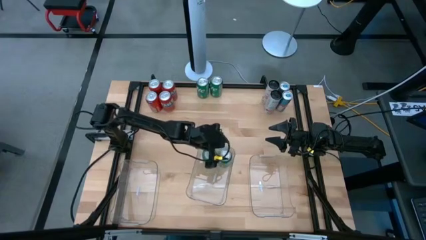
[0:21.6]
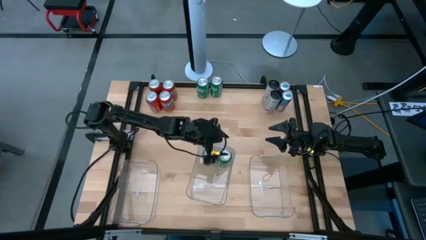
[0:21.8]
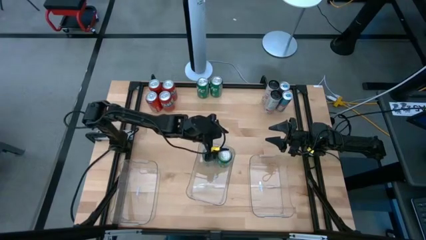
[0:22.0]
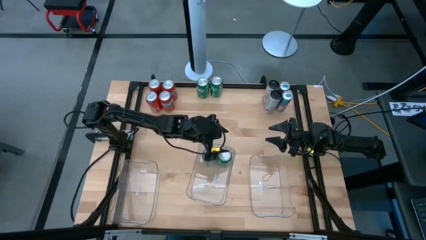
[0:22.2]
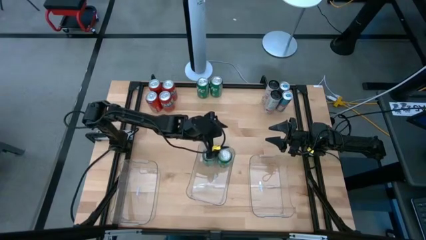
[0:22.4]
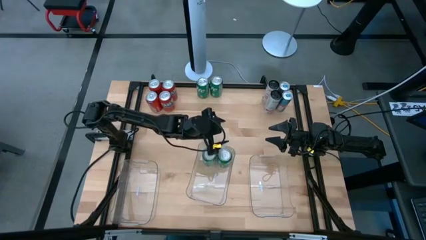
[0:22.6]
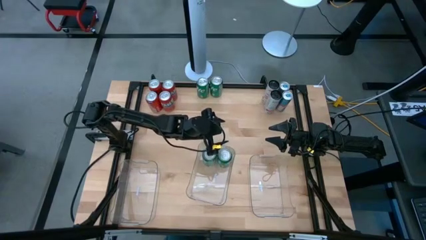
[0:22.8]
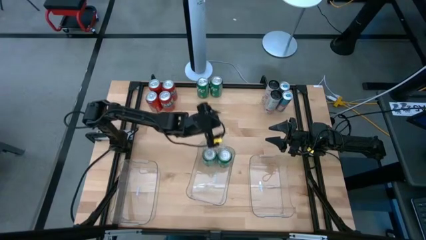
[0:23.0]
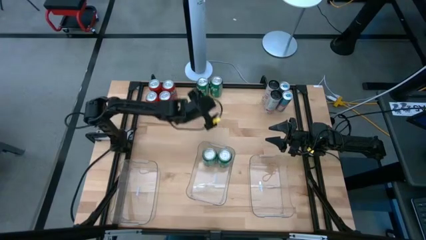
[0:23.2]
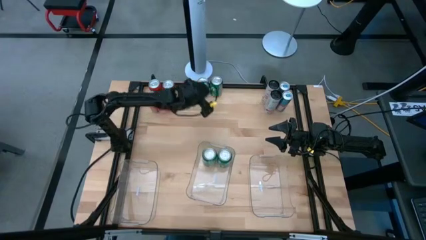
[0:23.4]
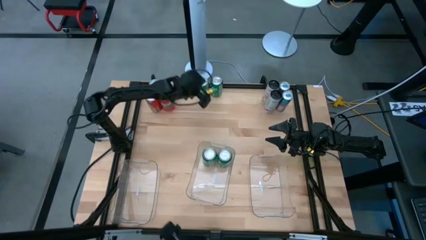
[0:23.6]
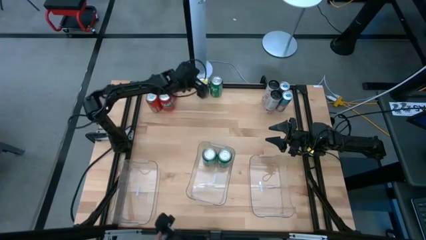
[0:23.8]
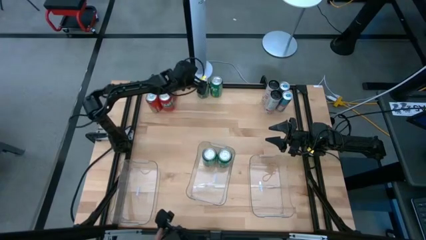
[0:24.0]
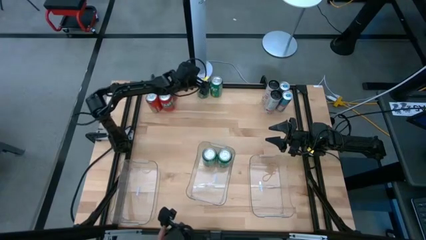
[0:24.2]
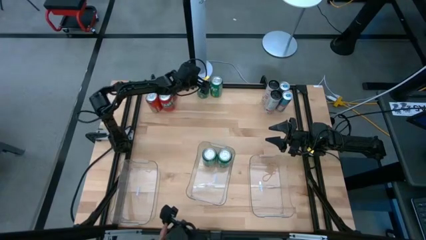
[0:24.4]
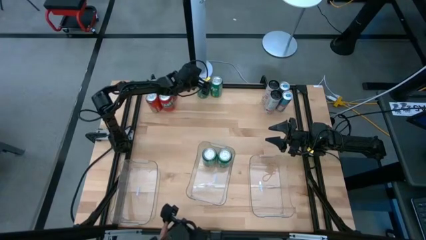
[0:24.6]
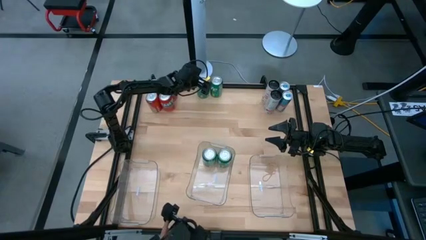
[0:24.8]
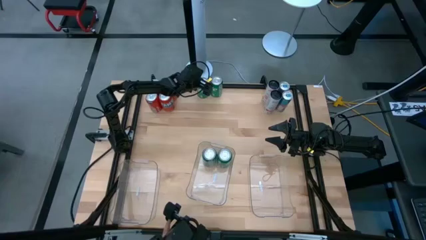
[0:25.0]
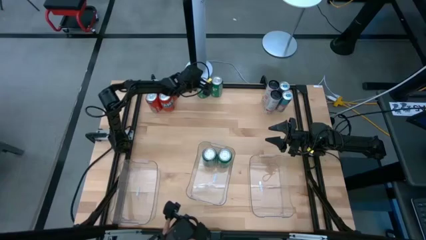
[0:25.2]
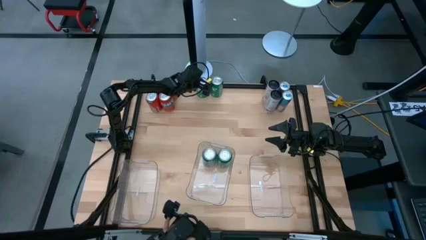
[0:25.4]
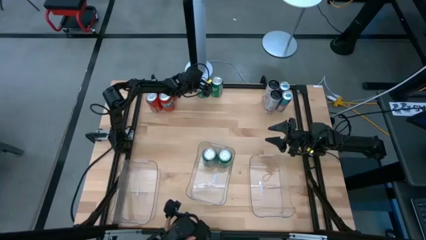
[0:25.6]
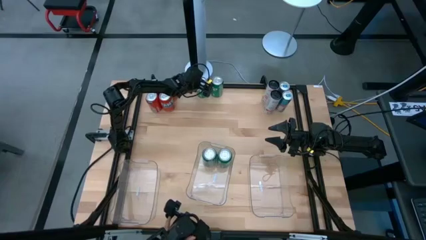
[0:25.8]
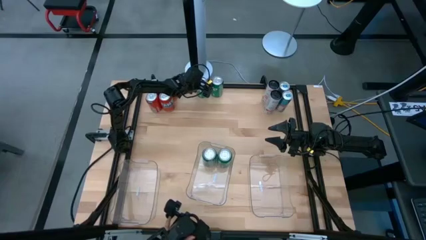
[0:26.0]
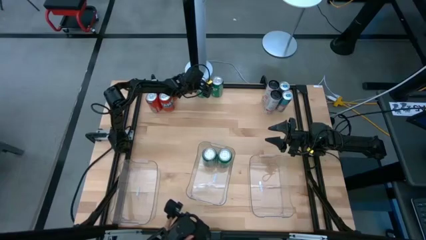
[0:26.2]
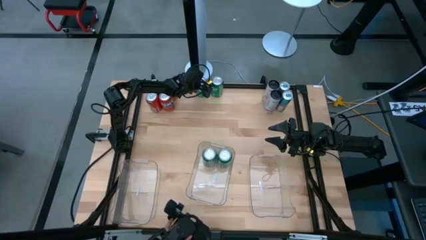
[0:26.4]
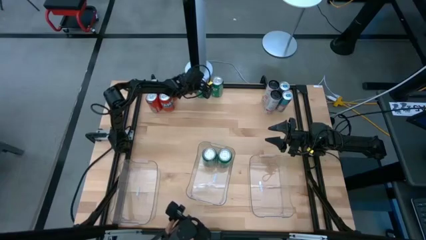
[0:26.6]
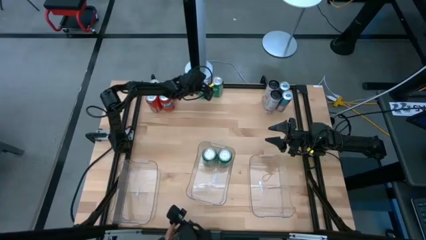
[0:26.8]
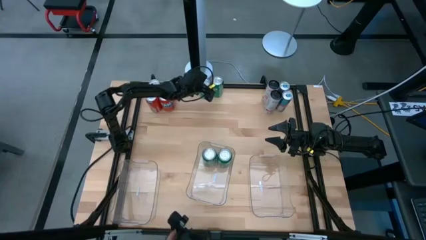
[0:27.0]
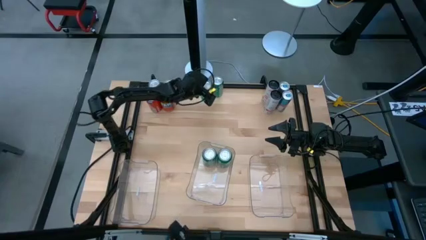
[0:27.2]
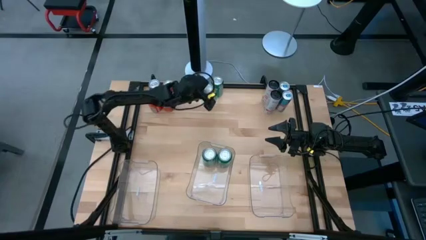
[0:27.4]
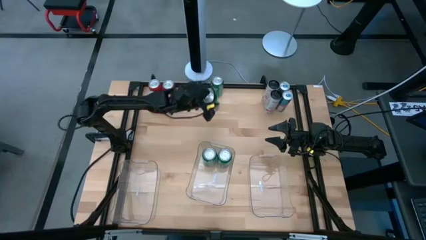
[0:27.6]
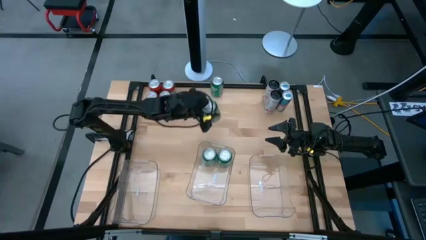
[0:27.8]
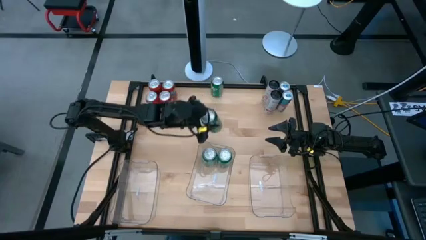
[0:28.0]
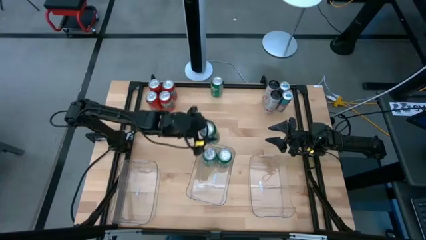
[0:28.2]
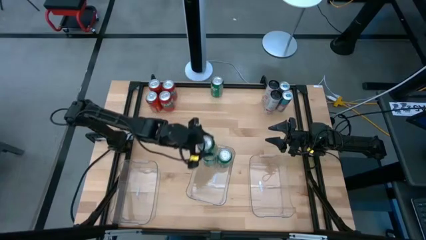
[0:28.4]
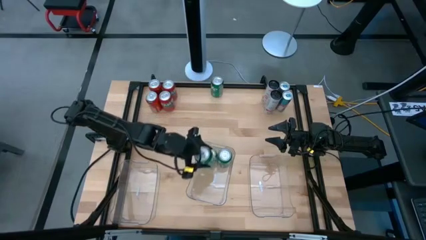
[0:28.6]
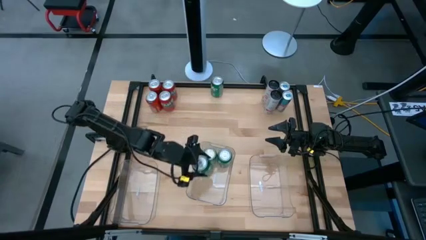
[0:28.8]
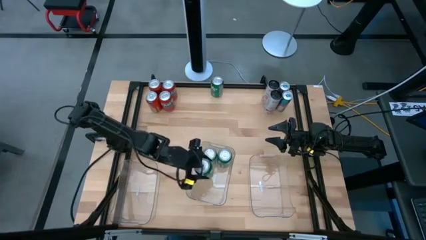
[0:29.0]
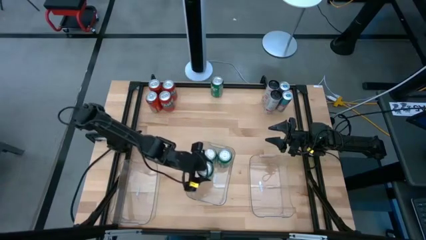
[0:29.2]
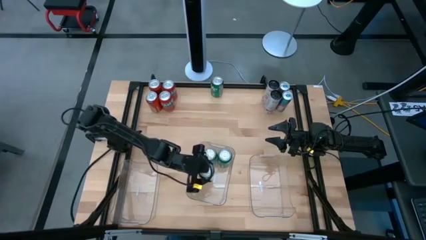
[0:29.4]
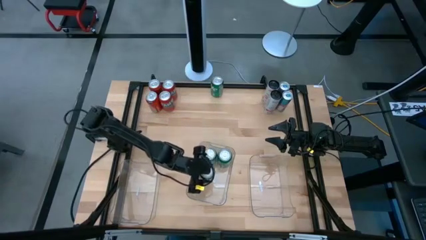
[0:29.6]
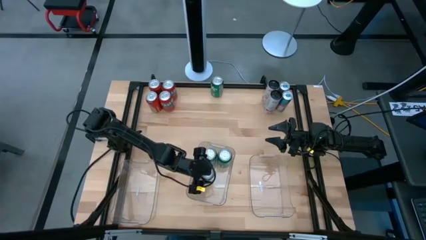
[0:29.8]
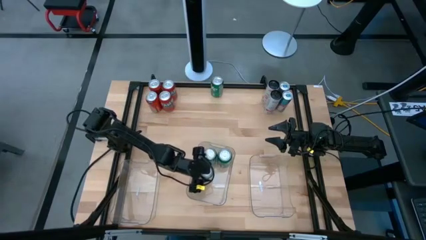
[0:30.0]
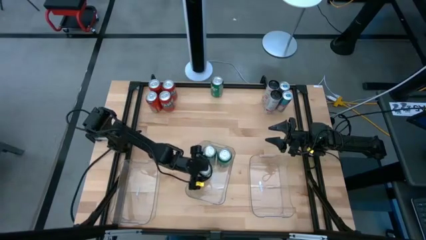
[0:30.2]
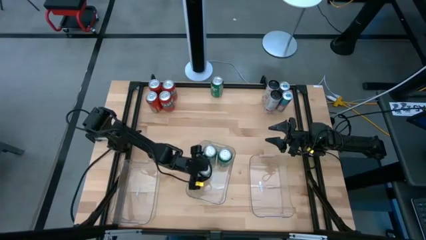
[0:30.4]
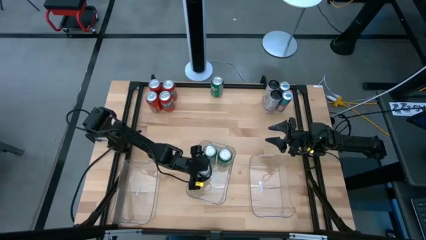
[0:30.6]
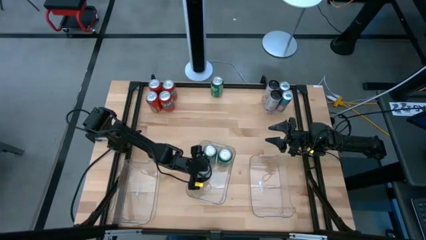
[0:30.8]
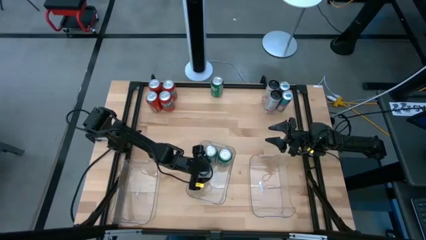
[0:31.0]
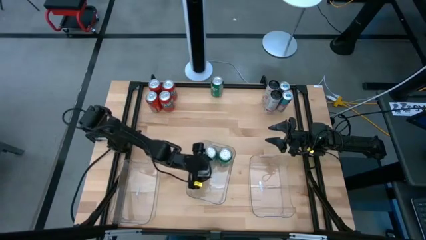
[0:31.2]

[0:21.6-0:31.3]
Task: Sort soda cans
Put the green soda can into the middle transparent bin

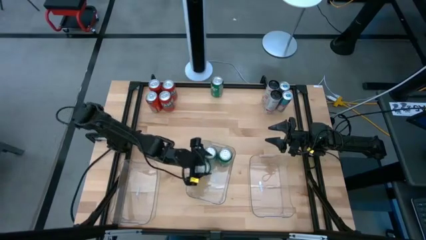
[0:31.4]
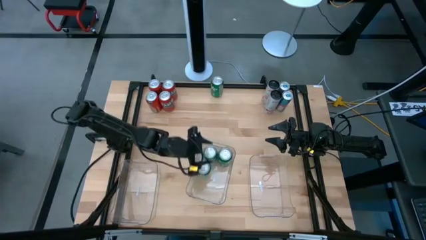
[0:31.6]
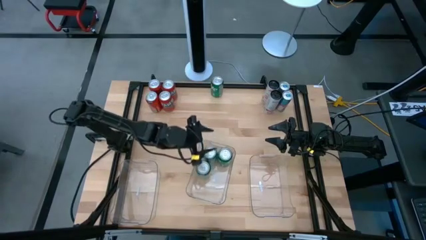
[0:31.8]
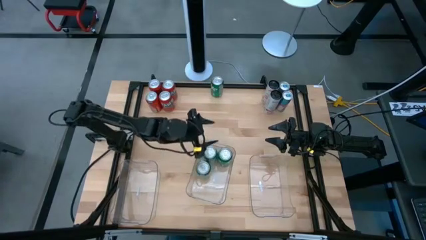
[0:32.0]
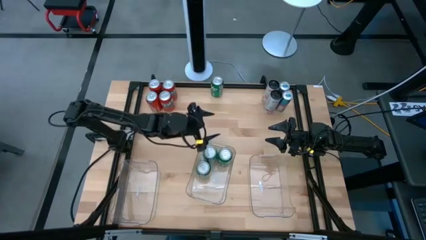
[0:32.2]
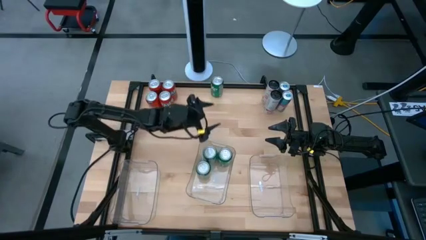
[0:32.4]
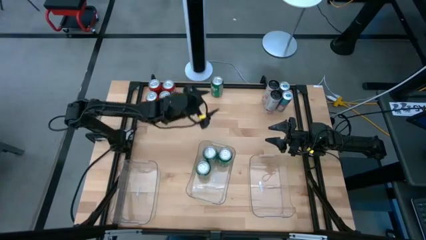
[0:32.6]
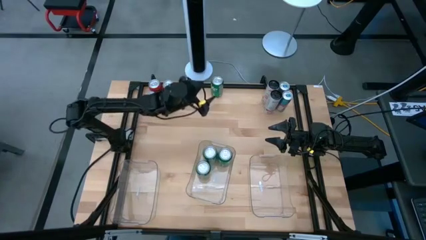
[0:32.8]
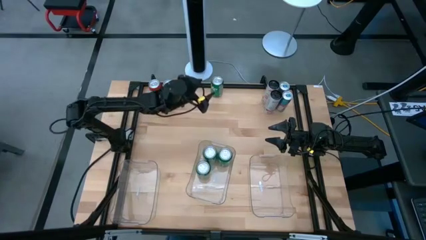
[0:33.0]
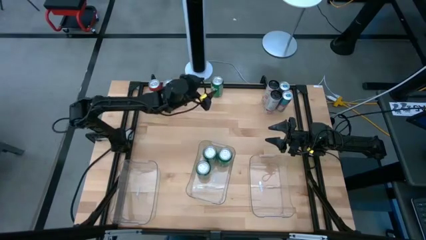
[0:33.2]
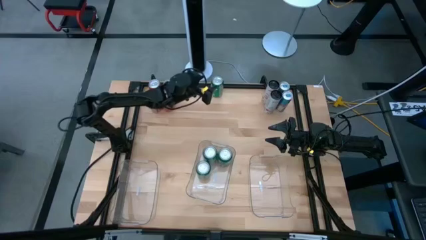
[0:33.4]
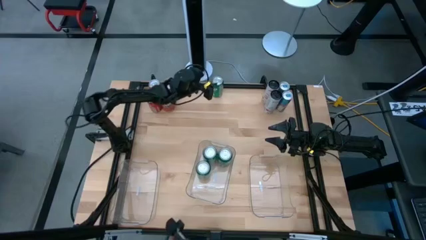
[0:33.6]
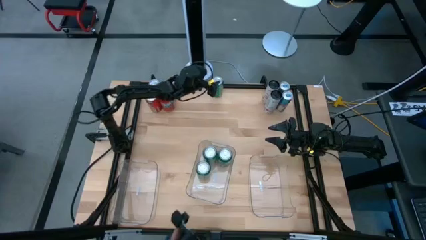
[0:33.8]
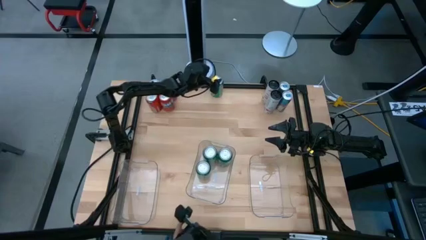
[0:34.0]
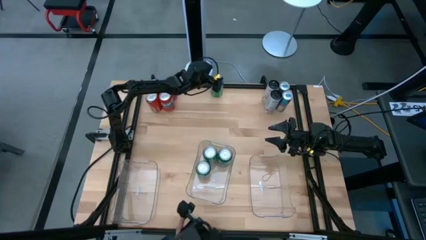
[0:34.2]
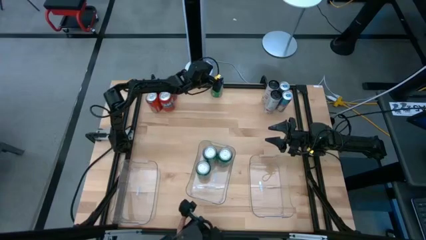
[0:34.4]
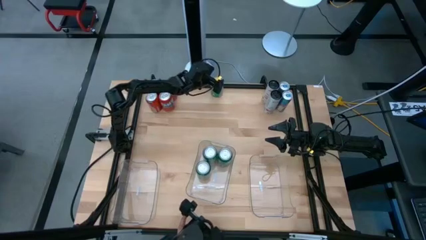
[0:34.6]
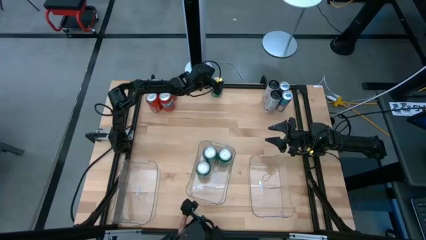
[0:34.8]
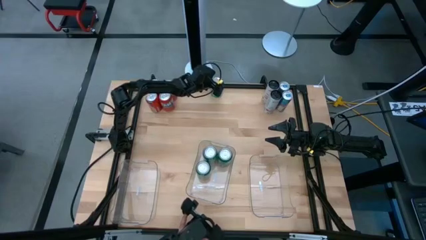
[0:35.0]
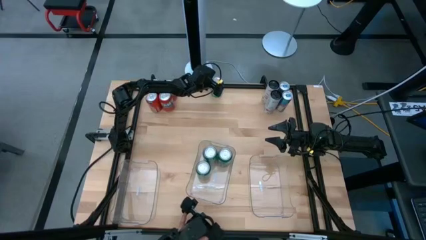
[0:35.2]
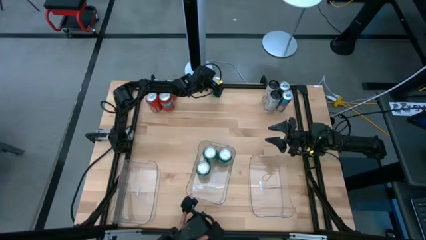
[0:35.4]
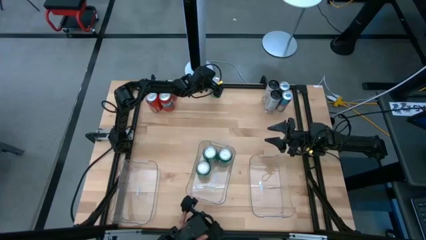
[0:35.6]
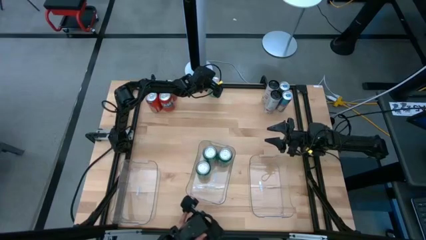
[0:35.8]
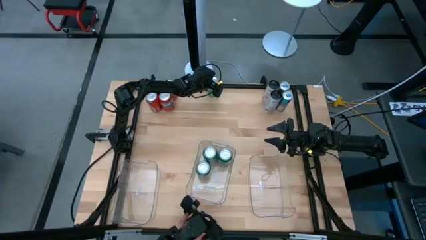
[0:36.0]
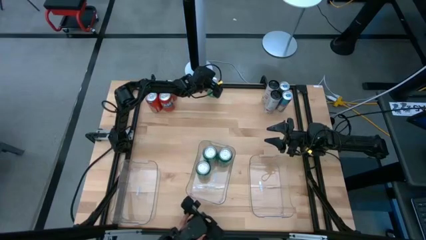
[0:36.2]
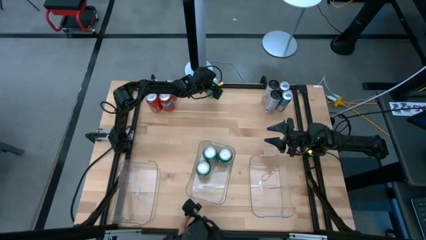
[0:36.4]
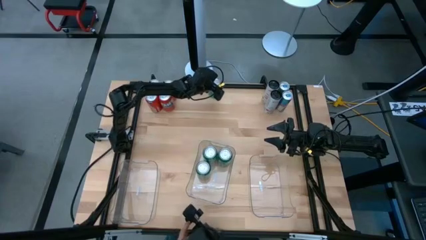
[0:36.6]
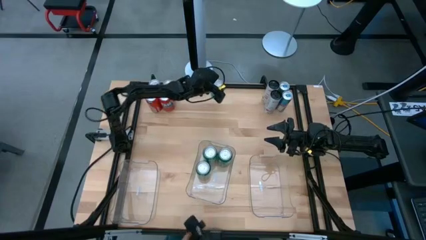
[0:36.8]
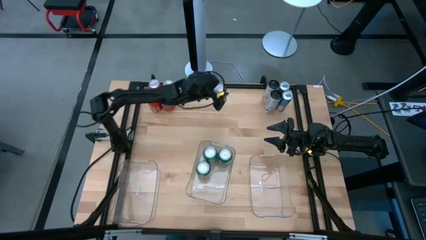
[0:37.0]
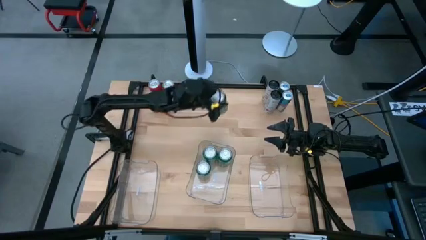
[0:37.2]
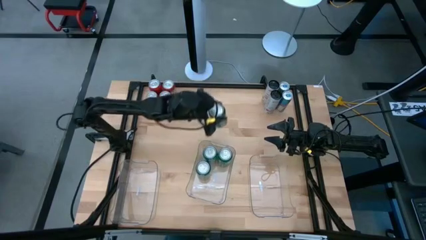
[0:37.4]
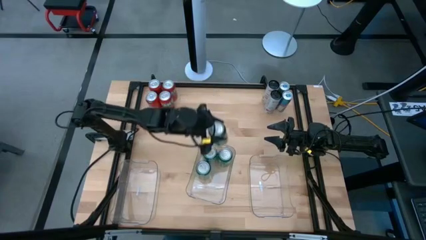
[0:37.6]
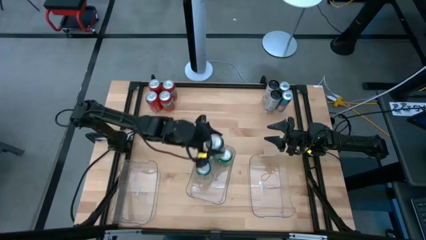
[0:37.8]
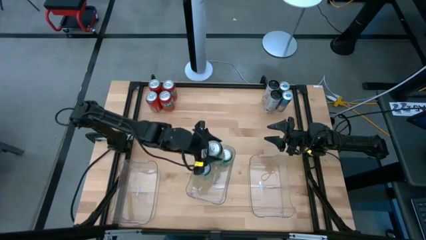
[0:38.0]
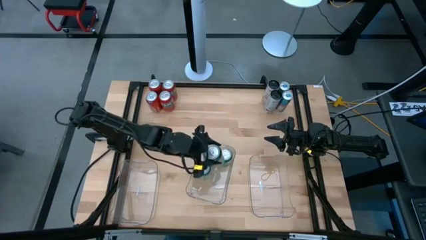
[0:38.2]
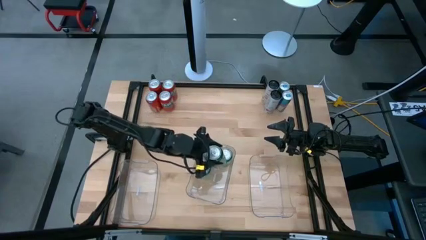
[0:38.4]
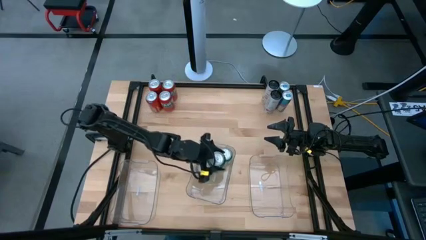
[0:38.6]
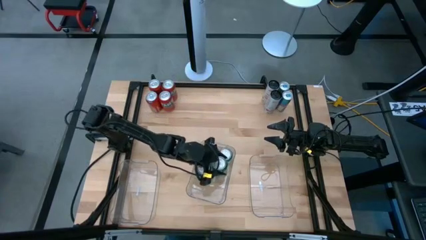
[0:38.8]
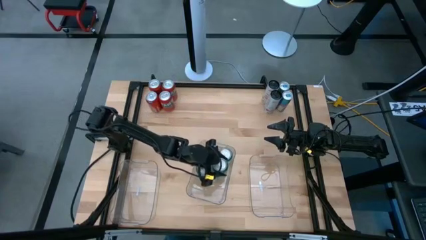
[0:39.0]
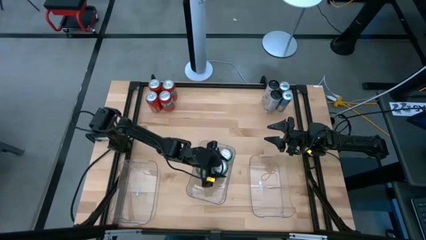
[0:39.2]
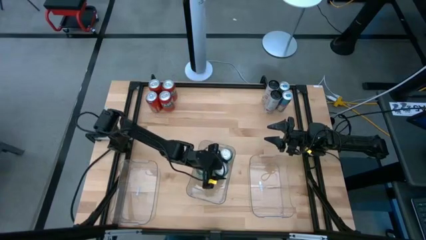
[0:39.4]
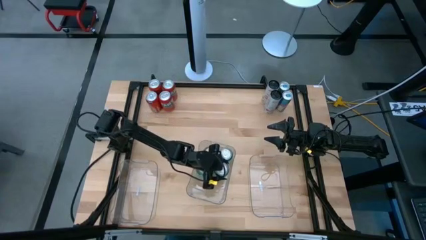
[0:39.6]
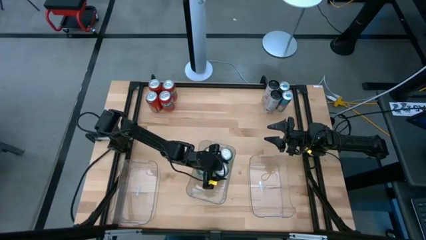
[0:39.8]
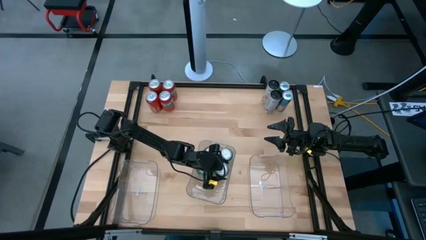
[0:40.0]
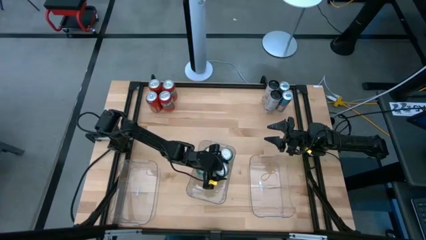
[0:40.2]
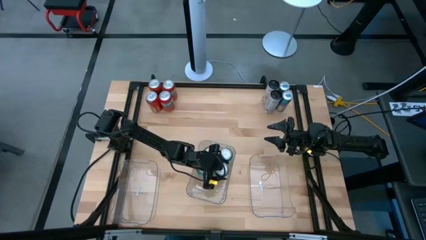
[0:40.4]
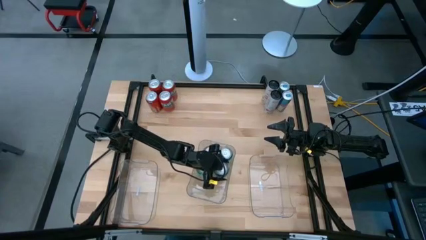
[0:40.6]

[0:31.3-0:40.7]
Put the green soda can into the middle transparent bin
